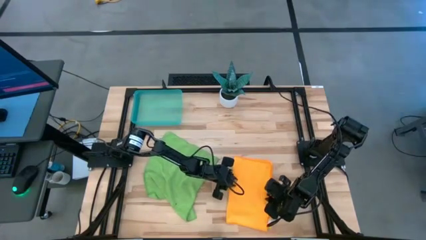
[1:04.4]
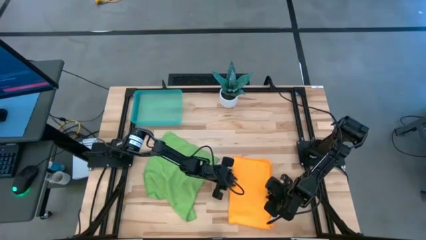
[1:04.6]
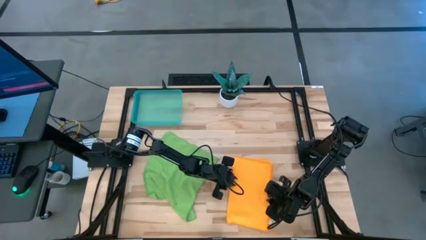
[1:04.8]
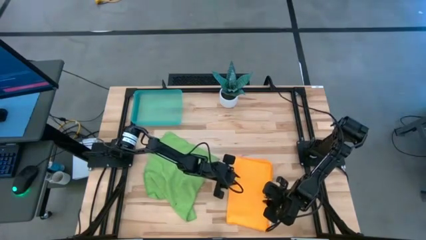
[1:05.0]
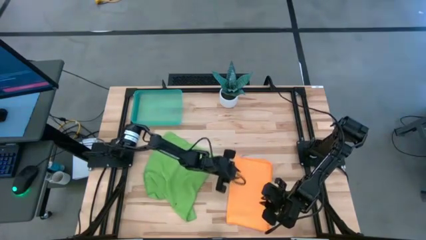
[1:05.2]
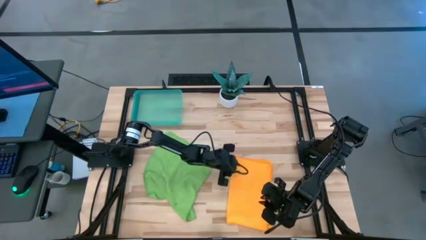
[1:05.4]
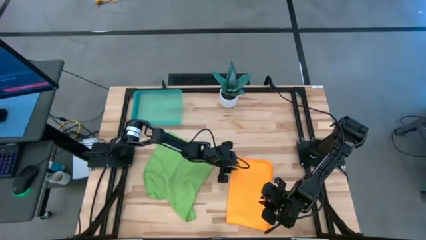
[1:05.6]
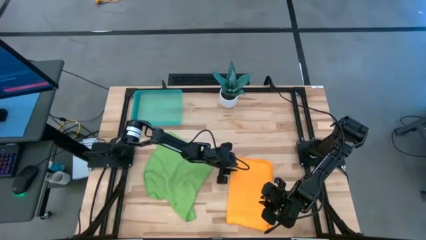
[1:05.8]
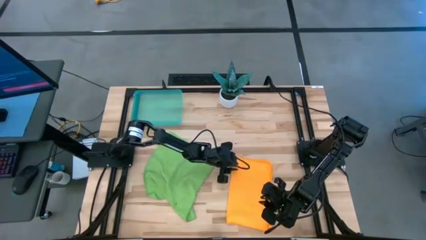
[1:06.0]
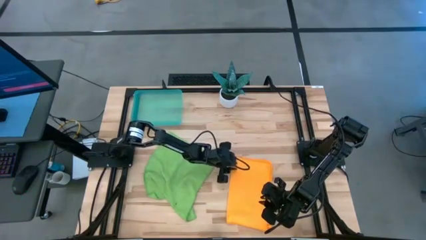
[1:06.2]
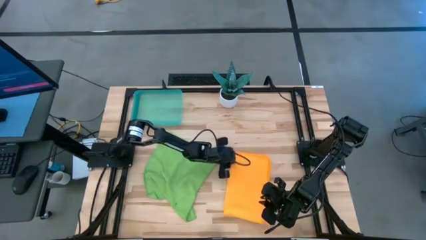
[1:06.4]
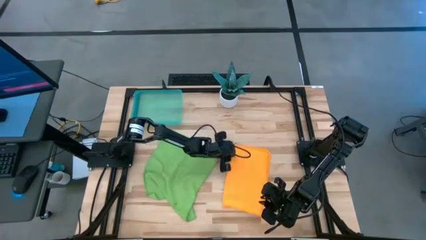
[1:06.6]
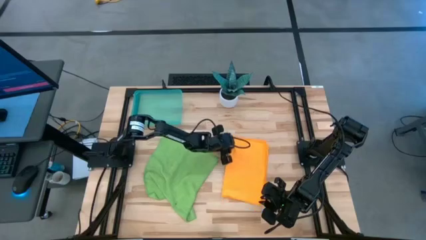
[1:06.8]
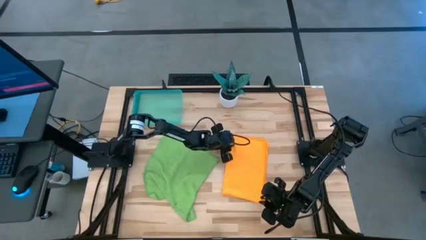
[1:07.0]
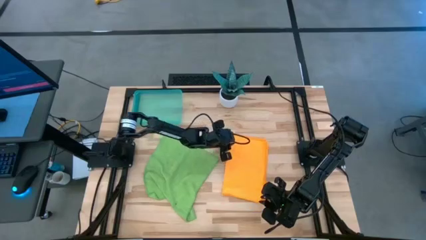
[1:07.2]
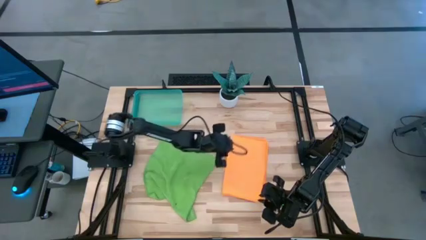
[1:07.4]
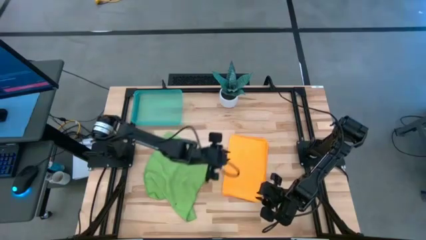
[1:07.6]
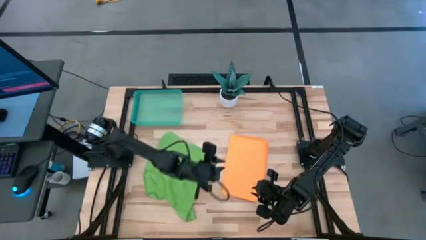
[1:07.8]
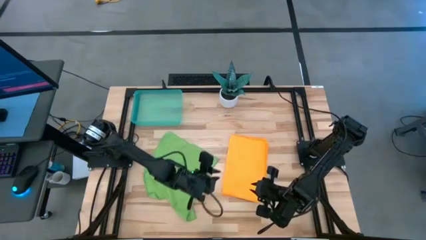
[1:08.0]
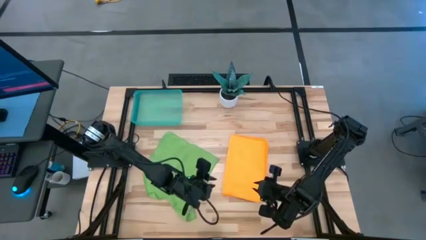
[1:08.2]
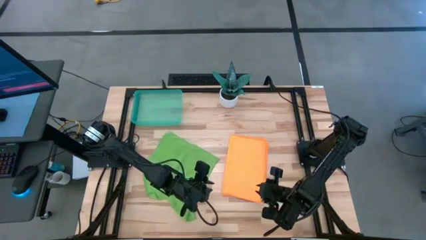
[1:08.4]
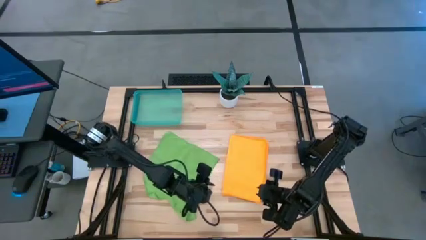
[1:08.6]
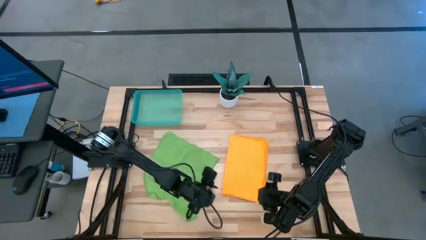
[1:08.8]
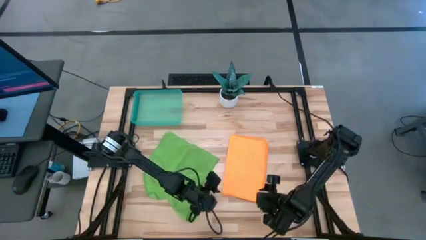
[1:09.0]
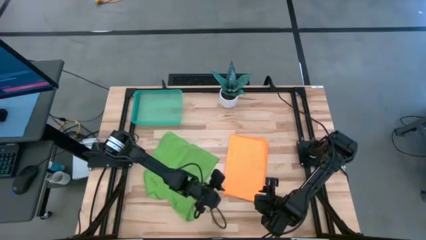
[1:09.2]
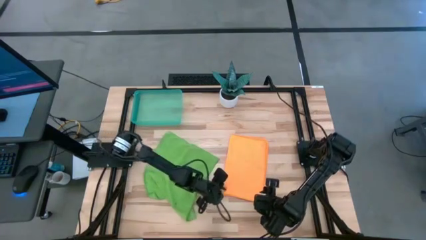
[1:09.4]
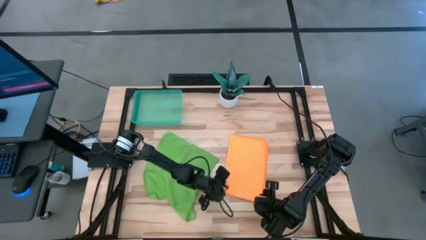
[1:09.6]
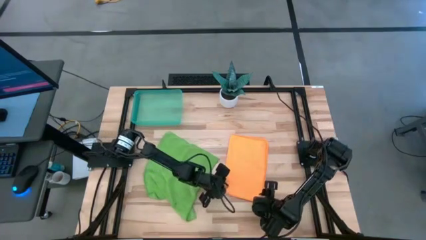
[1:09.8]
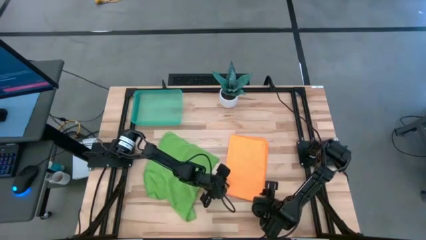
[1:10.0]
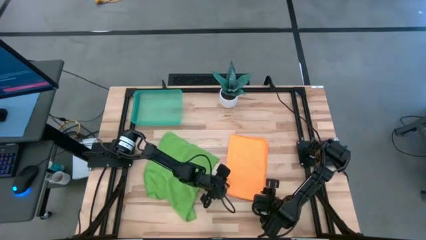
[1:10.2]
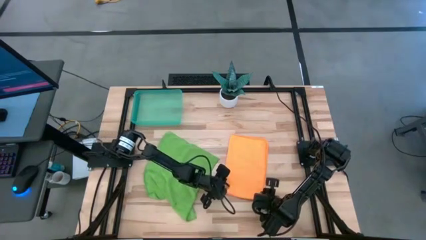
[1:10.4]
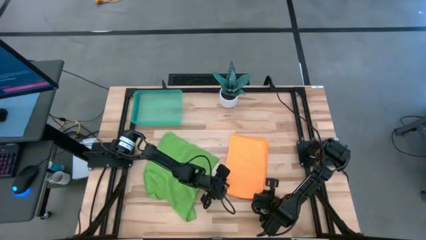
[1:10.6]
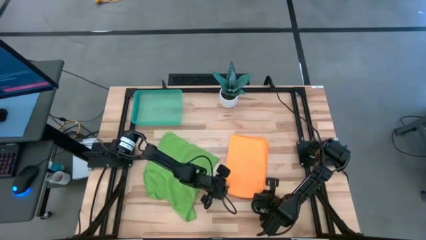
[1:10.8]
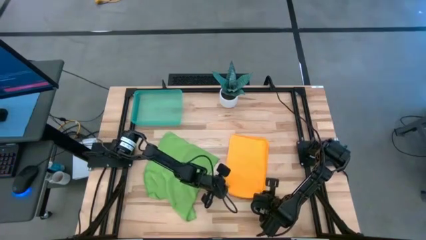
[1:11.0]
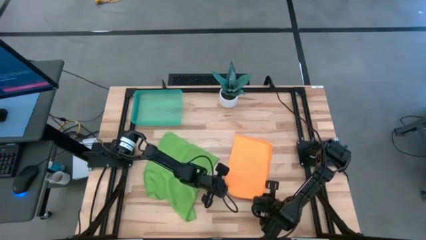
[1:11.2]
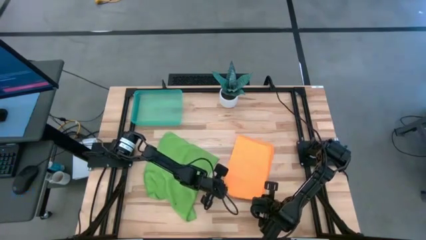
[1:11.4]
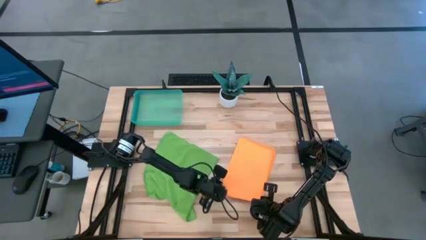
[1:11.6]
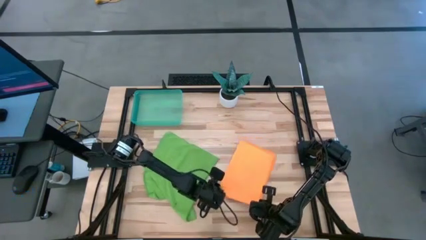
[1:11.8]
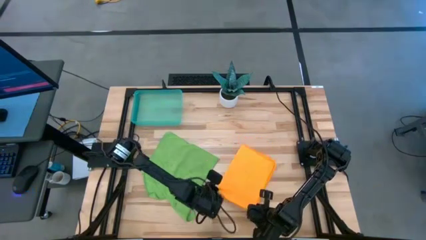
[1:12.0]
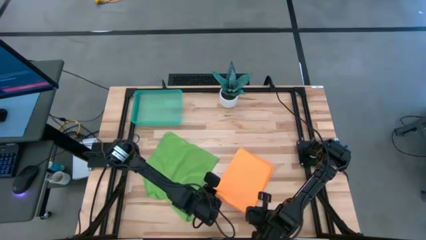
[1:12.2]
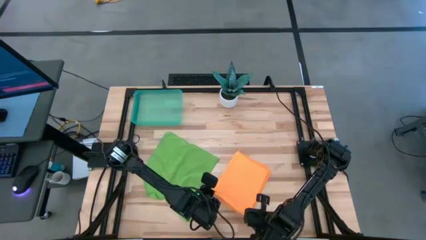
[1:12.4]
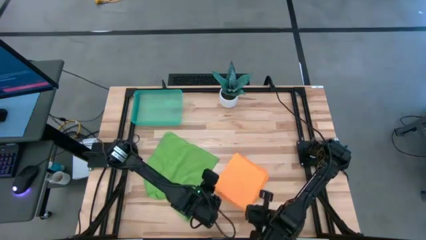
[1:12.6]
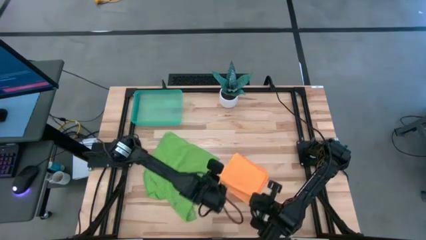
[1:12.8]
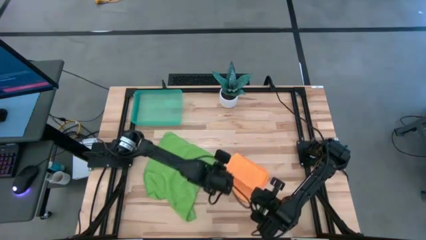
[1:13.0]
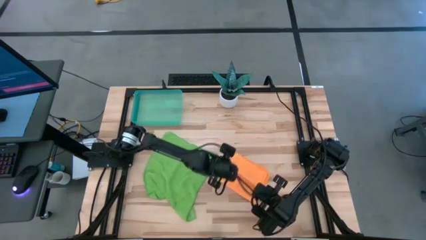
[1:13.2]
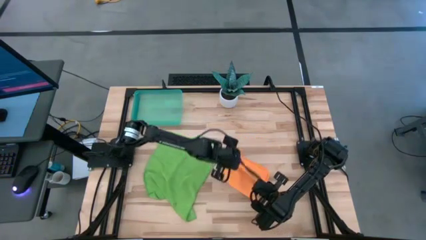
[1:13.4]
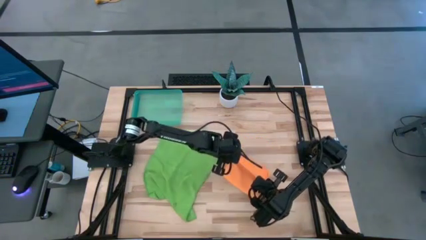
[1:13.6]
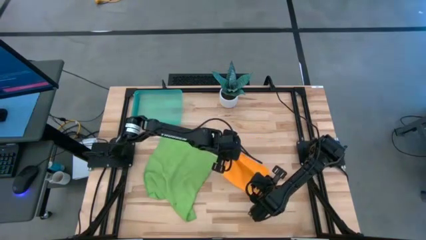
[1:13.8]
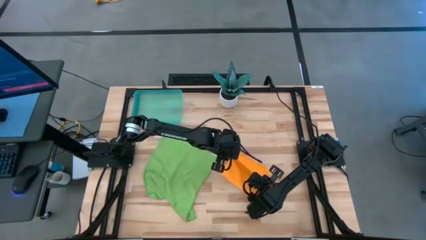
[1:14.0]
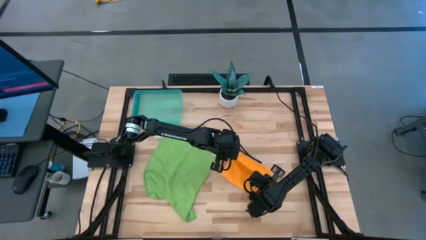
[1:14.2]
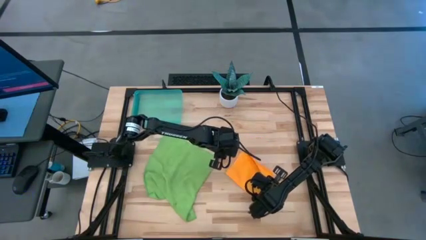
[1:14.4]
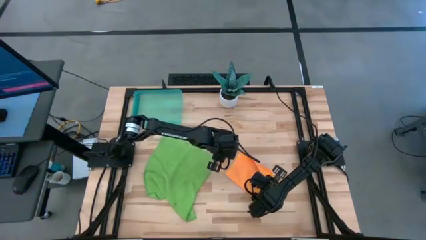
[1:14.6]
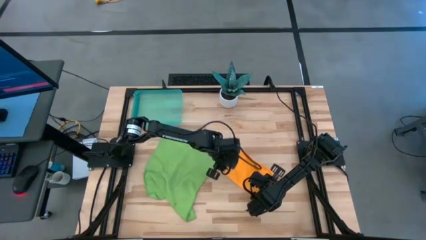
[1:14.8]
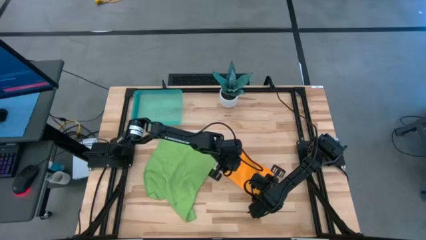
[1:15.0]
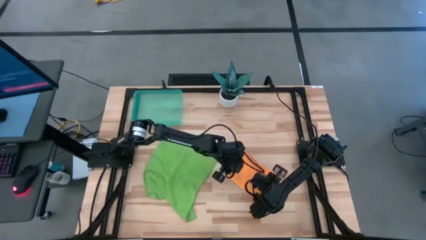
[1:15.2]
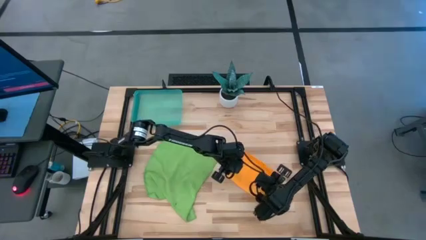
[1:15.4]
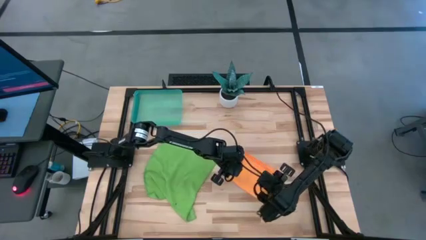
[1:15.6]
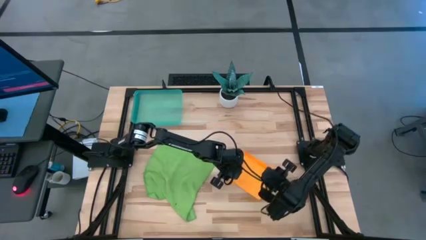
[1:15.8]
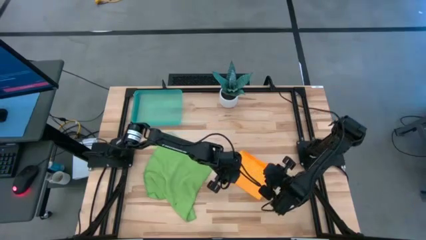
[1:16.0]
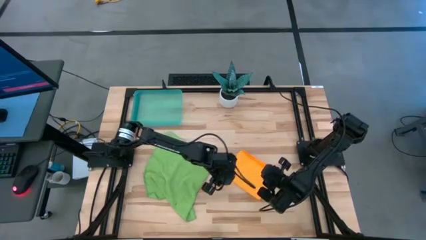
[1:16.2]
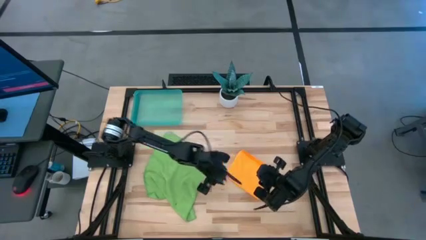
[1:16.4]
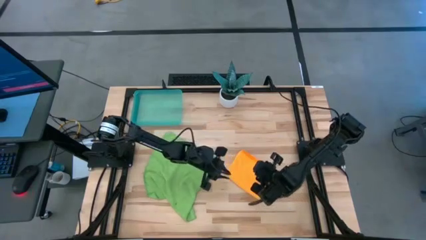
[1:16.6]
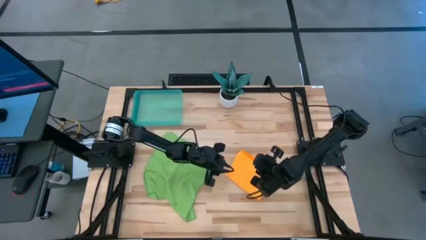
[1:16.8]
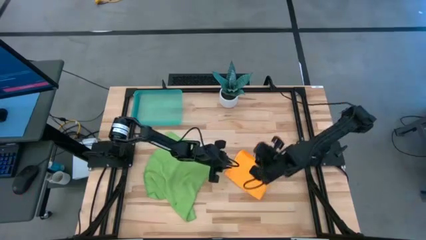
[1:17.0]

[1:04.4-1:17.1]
Task: Roll microfiber towels into tight, uniform cylinder then place into a basket
Fold the yellow microfiber cloth

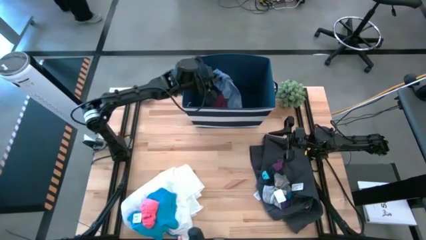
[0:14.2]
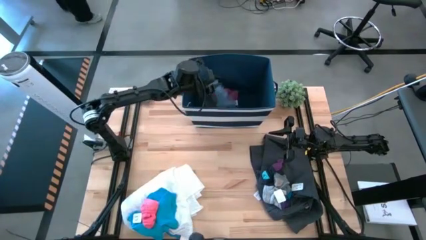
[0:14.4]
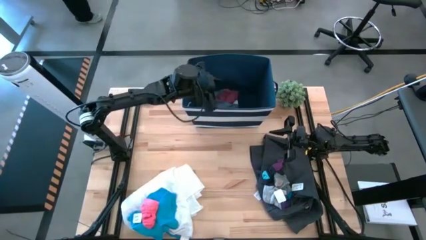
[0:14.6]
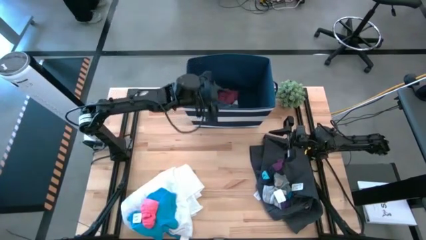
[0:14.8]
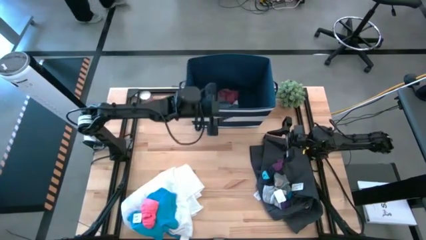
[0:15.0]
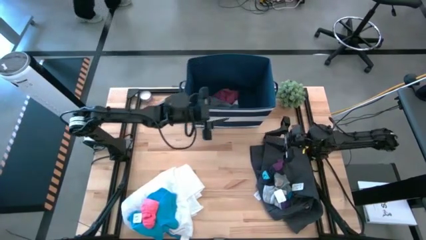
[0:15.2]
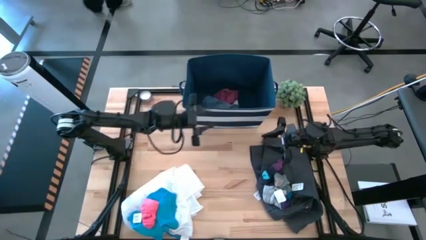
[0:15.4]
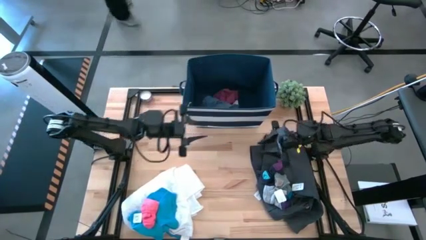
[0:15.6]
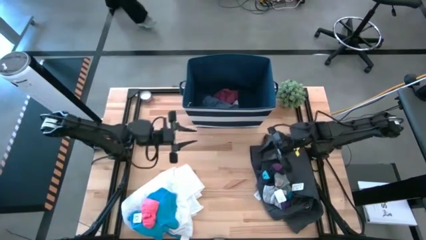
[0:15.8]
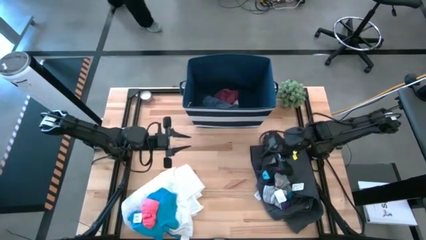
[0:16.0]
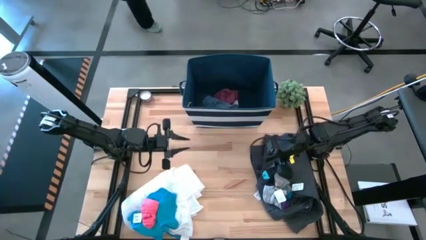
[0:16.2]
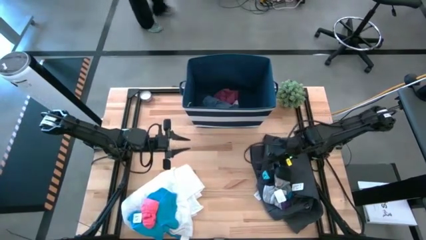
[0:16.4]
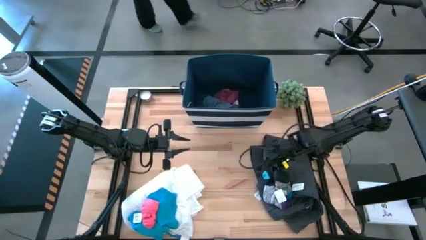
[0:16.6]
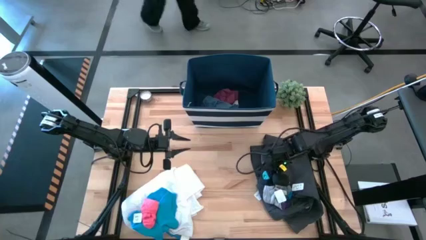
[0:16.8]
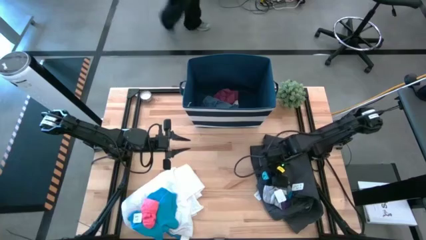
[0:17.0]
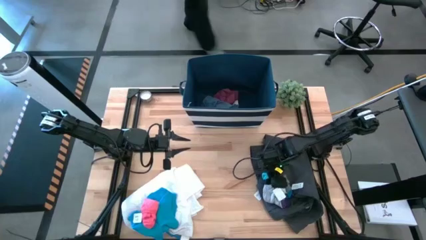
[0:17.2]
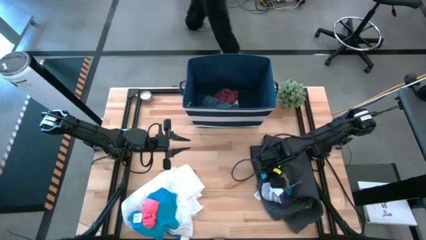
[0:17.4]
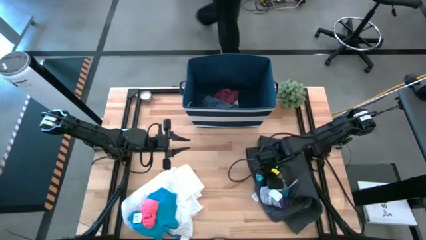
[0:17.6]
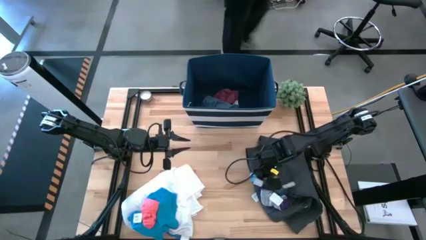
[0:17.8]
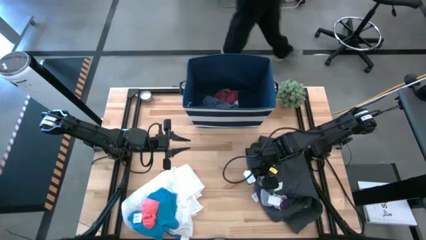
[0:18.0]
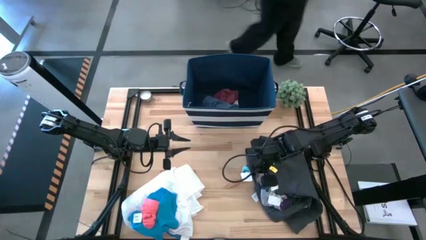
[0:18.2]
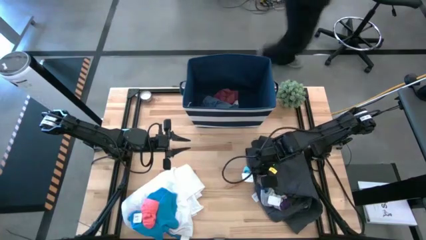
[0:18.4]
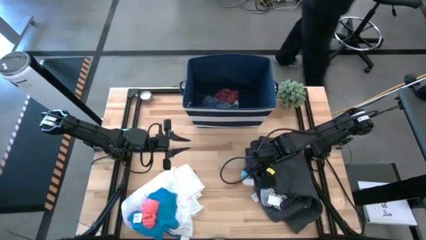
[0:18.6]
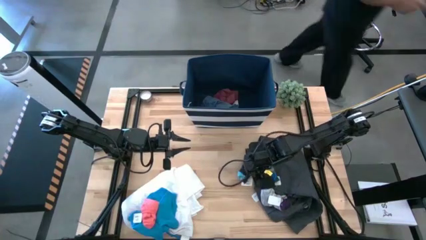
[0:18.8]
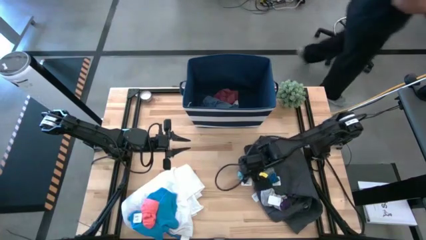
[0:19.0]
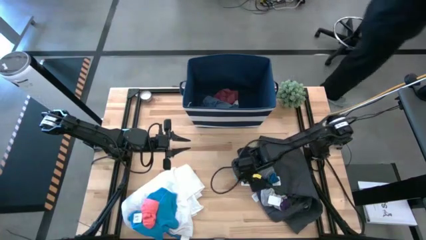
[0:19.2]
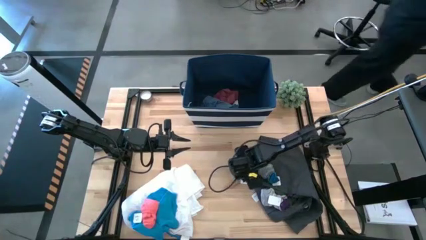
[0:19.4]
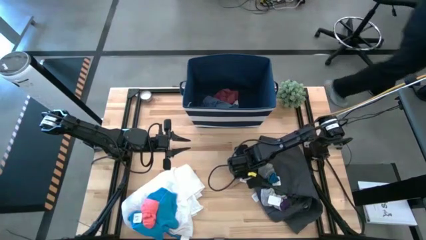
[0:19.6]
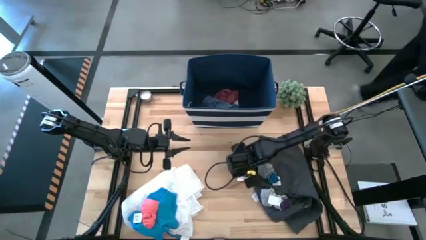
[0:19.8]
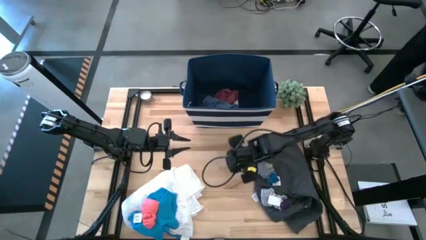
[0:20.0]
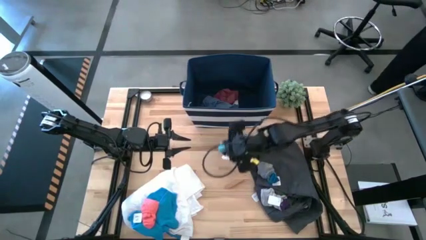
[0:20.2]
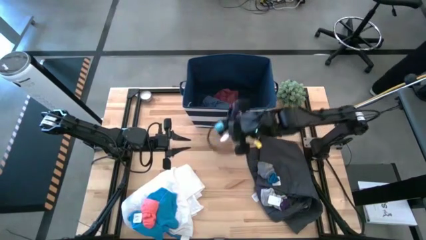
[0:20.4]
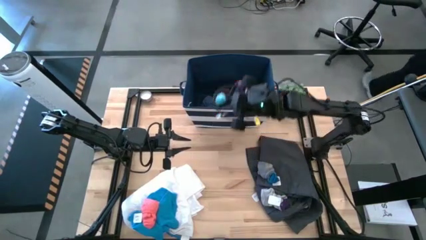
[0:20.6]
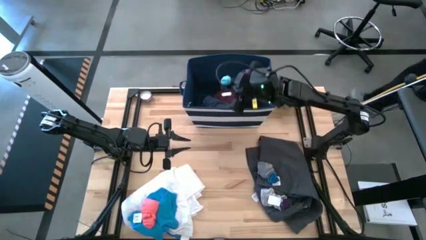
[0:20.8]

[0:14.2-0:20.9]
Task: Sort clothes
Put the light blue sock into the blue bin
